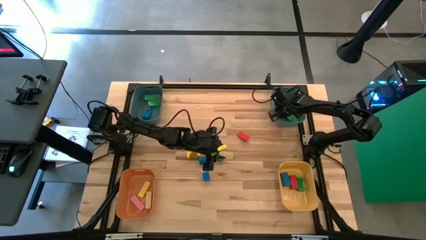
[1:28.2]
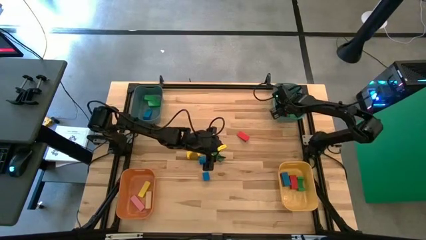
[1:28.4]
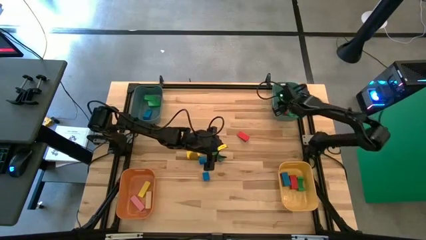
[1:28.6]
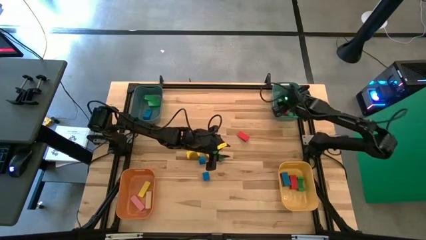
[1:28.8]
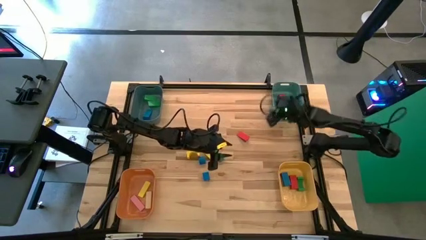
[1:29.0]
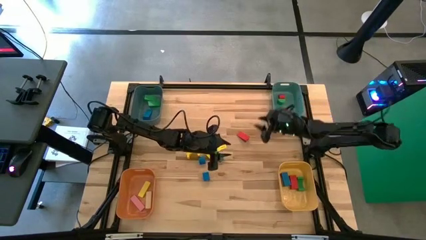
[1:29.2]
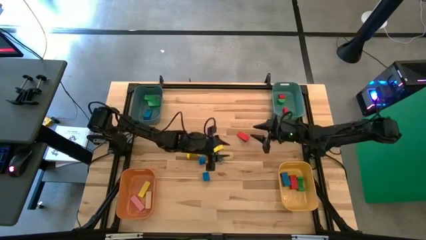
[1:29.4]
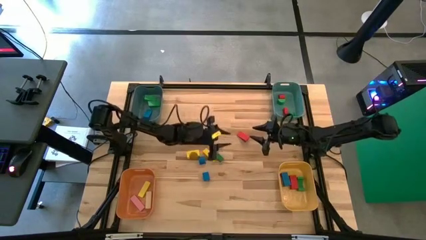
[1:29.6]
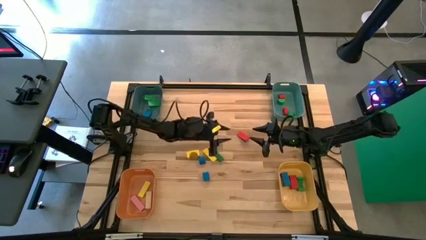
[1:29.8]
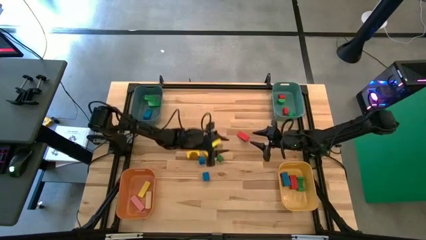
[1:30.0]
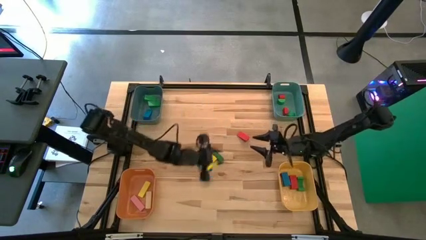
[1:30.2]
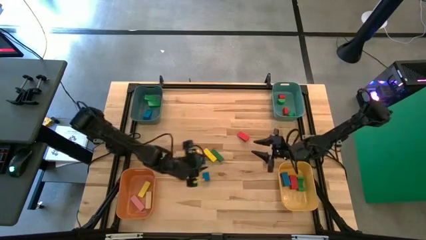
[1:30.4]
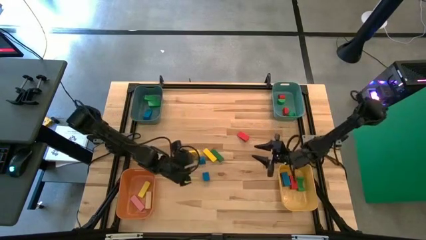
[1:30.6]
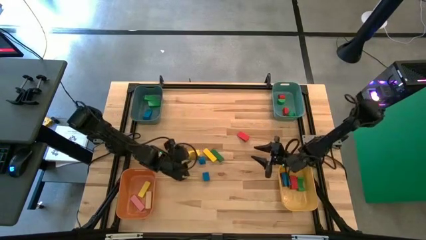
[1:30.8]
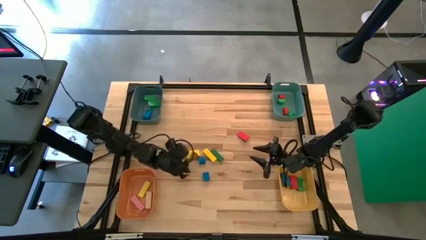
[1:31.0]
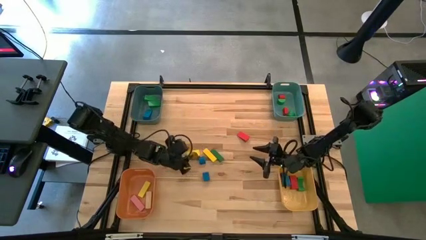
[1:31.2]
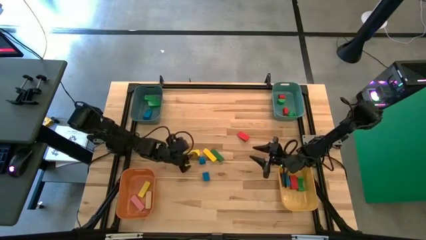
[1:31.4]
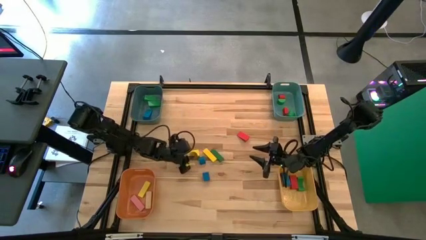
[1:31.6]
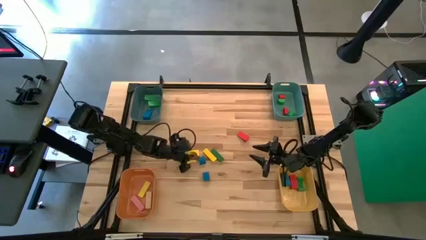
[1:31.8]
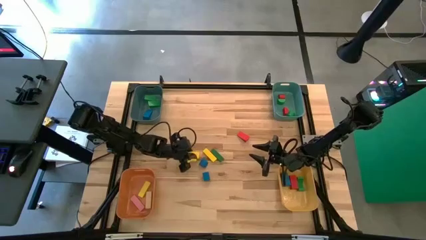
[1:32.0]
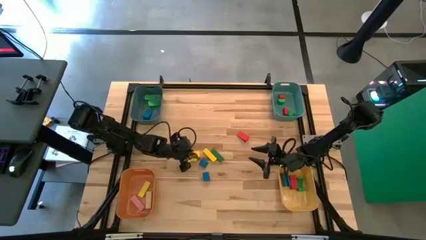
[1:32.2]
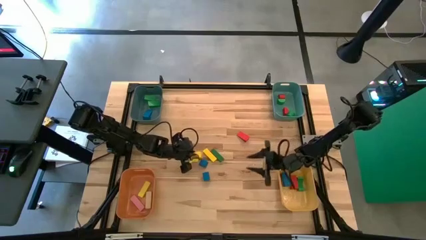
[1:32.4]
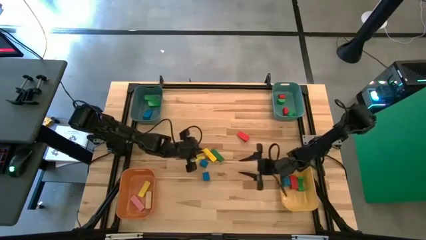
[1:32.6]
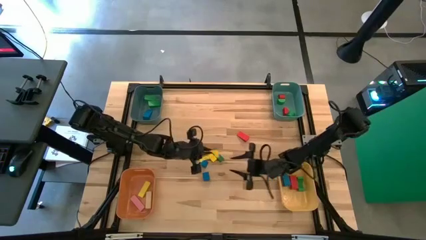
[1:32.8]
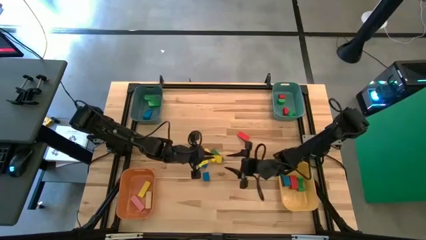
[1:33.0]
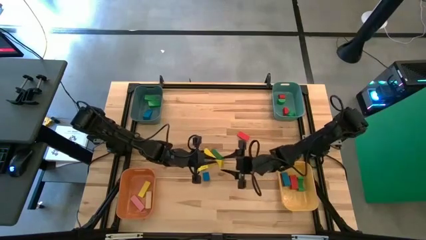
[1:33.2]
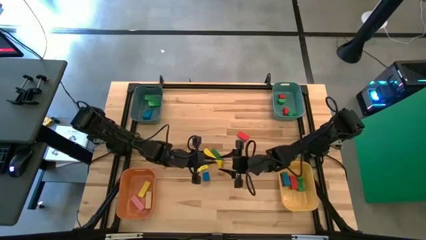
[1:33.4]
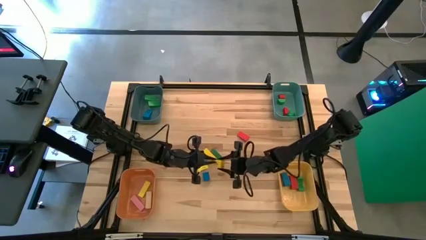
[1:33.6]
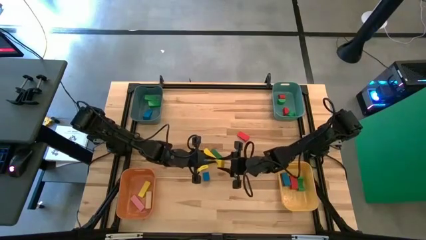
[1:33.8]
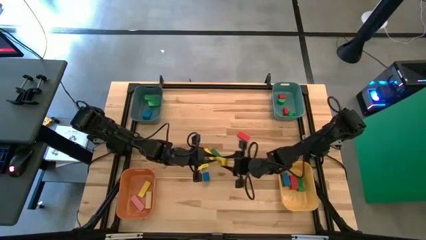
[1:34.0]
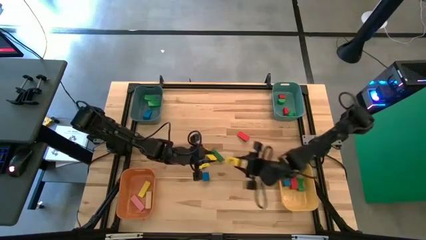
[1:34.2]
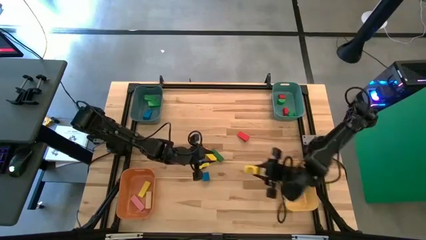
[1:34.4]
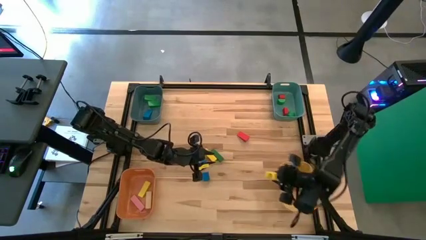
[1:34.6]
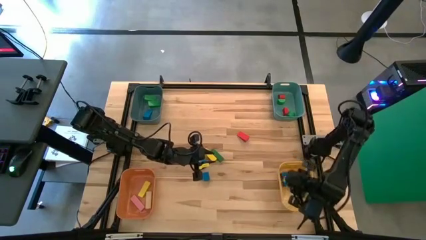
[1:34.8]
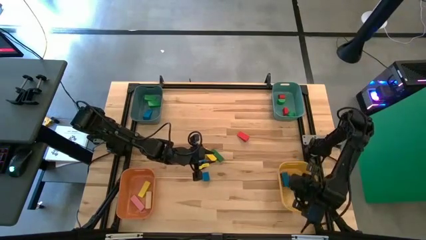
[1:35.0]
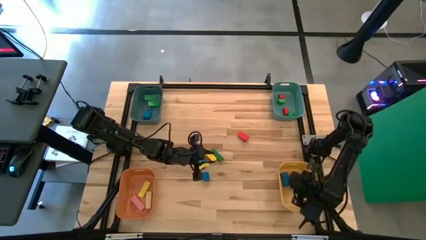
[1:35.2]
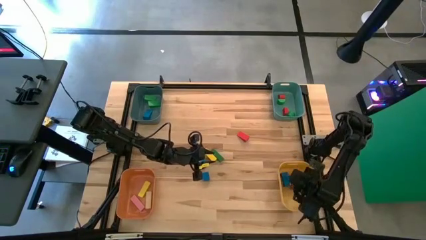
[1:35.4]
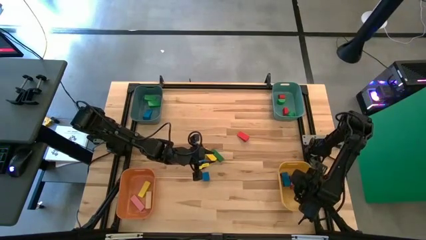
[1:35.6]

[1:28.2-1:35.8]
Task: Sort blocks by size
Put the yellow arch block into the yellow bin

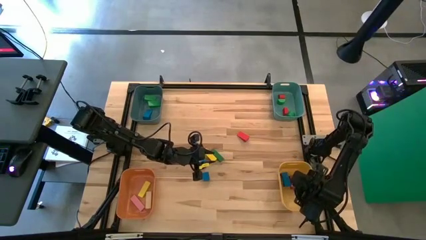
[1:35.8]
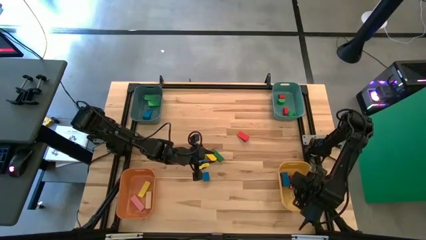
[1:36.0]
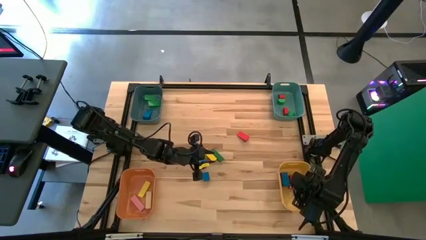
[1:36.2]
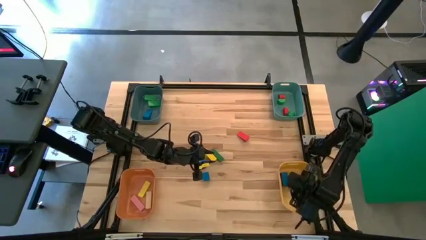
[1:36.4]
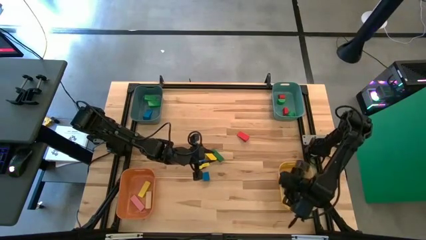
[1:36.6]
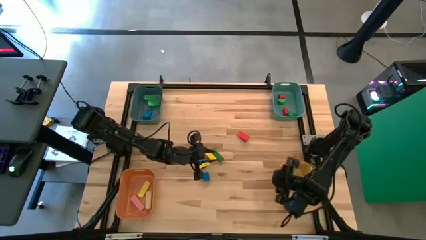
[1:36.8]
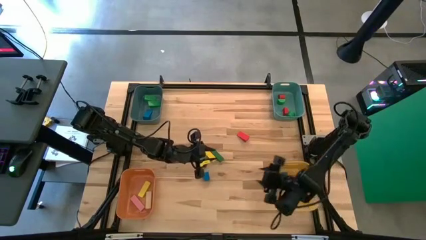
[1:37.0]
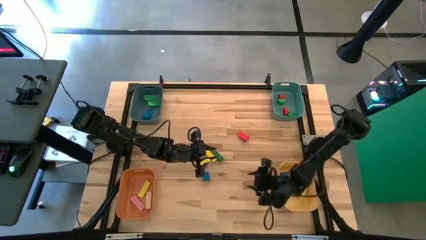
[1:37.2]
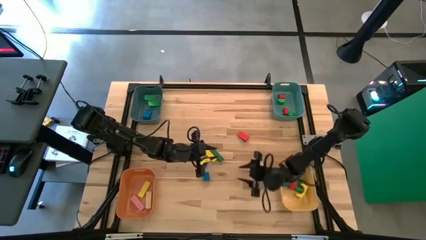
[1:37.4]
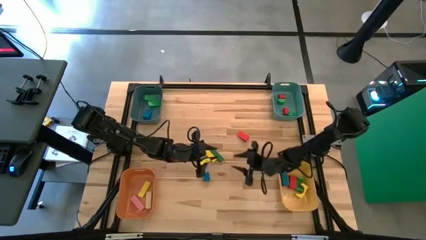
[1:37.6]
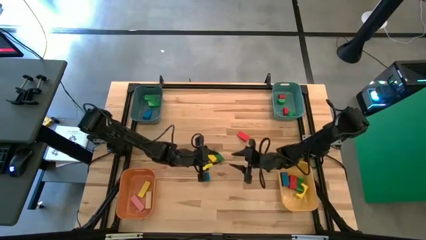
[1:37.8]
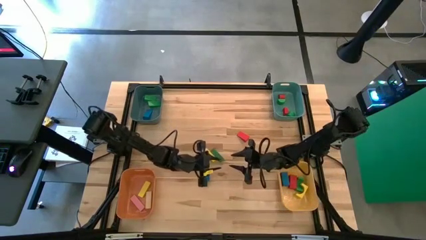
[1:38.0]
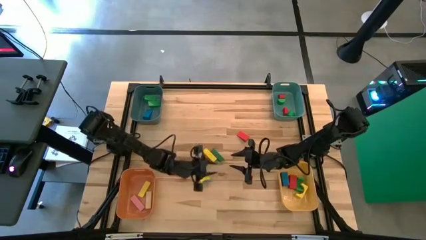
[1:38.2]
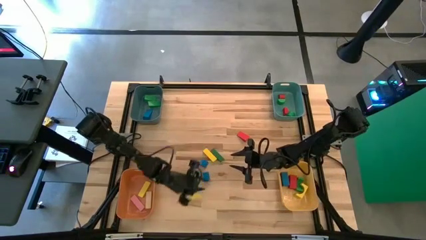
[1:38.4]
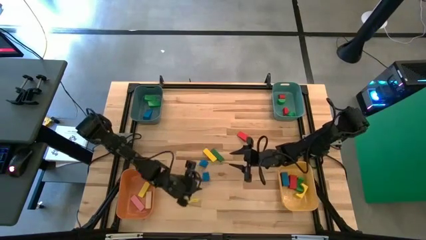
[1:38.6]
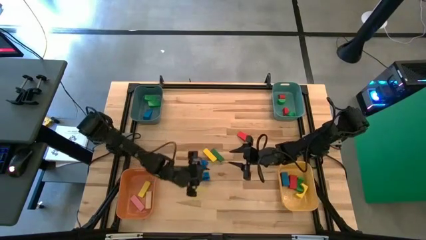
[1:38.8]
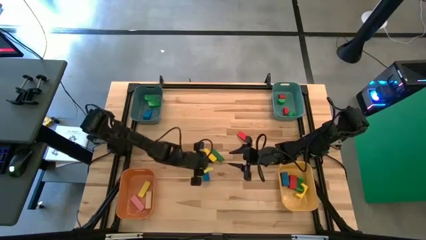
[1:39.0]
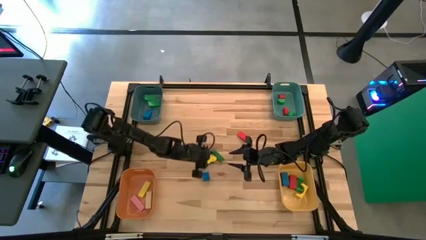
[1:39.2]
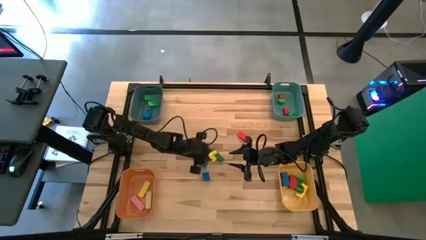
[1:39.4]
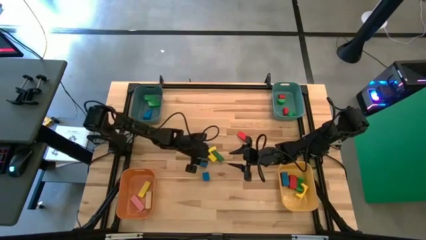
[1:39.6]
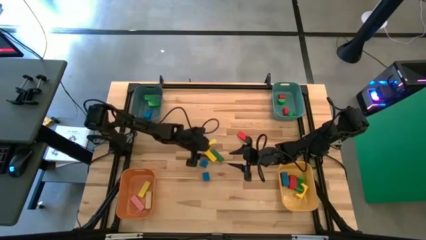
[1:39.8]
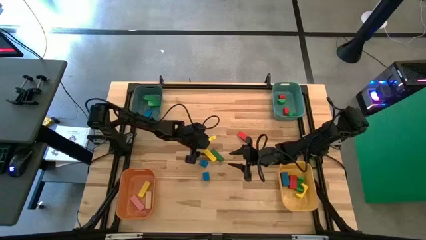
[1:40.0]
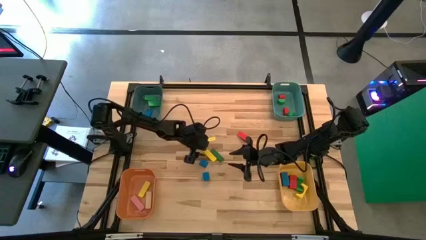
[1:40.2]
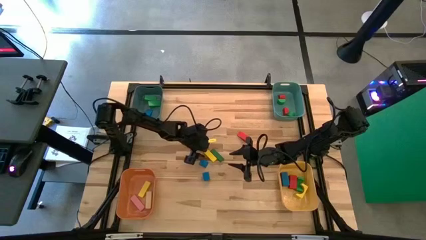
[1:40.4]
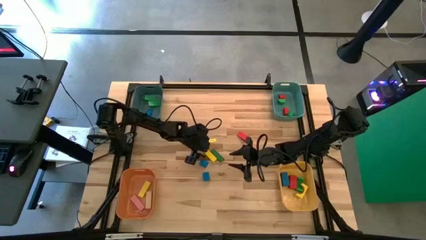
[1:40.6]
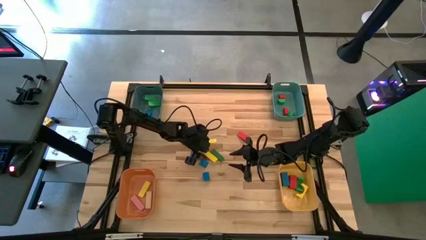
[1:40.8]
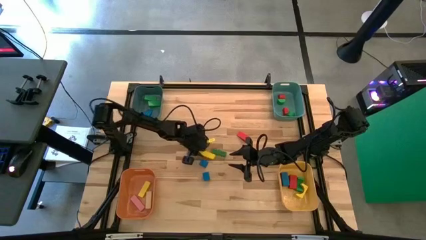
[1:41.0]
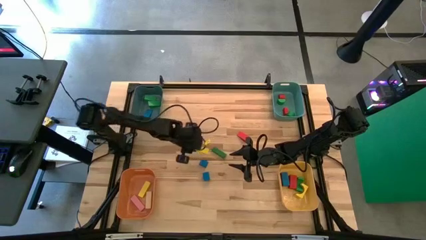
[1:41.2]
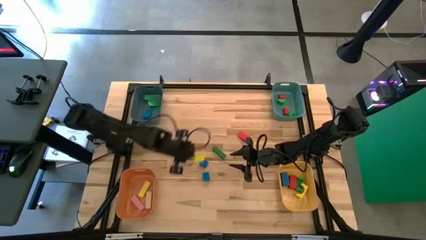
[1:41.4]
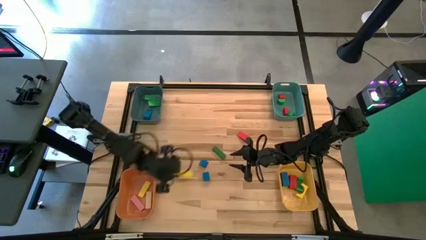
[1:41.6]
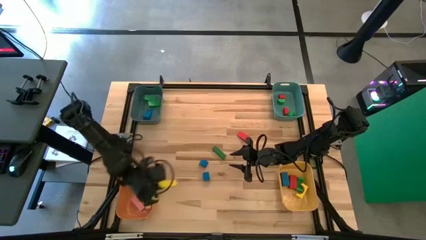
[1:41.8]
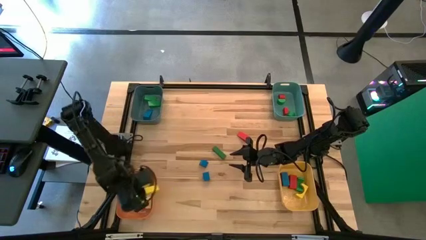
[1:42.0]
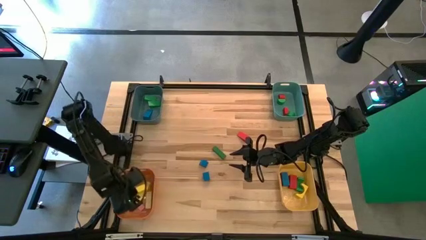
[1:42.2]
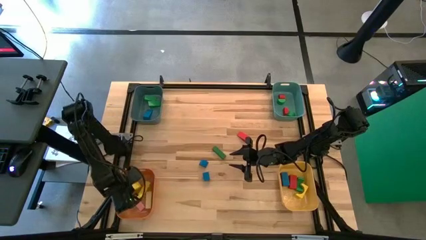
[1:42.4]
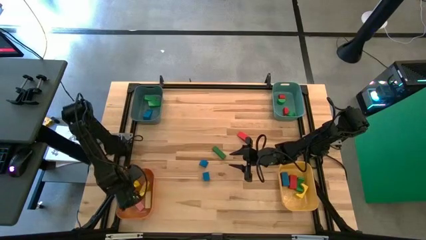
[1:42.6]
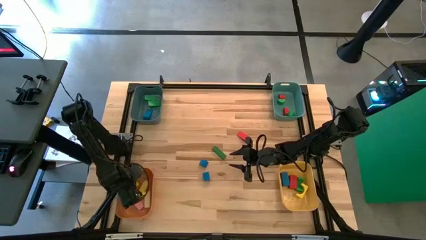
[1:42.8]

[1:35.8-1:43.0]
Put the yellow rectangular block into the orange bin

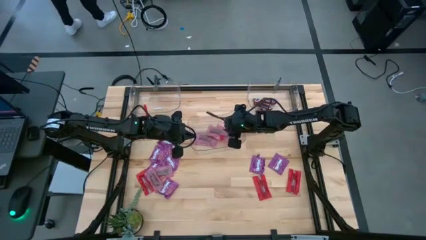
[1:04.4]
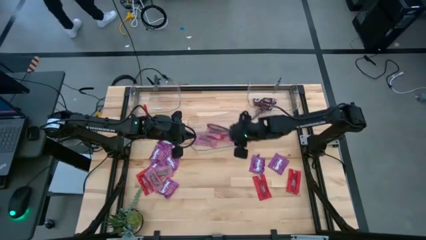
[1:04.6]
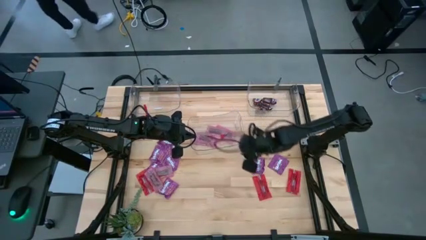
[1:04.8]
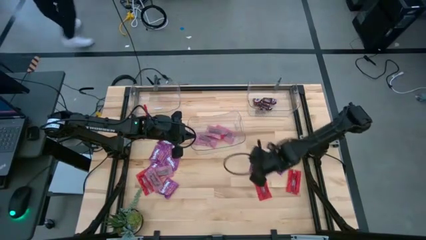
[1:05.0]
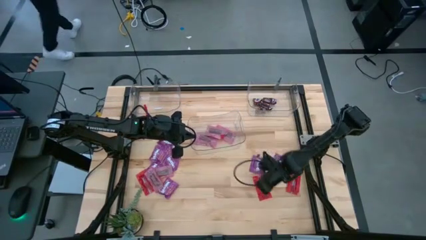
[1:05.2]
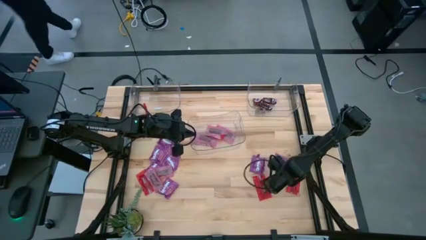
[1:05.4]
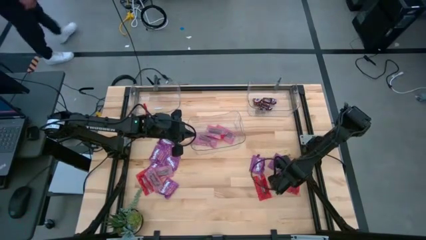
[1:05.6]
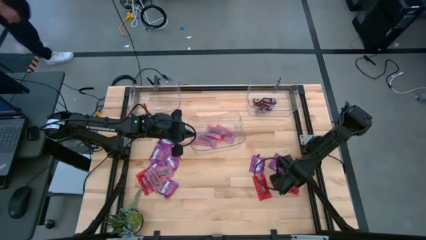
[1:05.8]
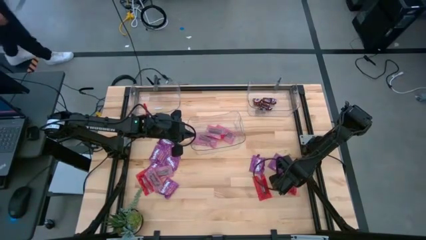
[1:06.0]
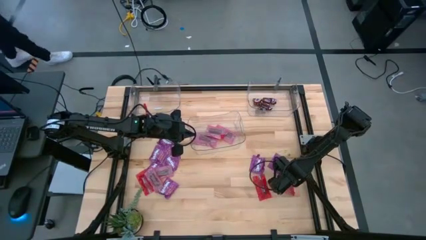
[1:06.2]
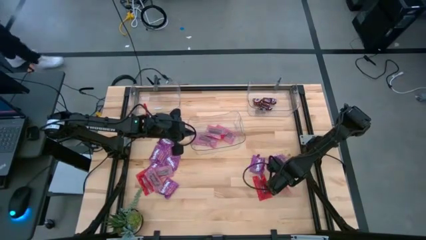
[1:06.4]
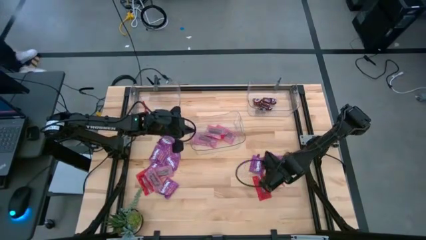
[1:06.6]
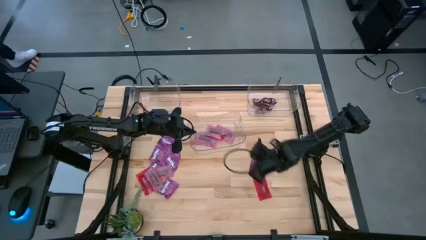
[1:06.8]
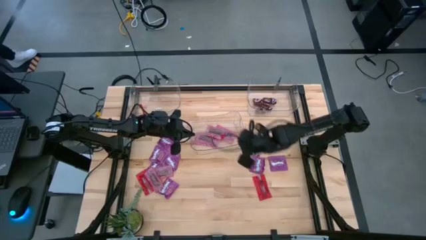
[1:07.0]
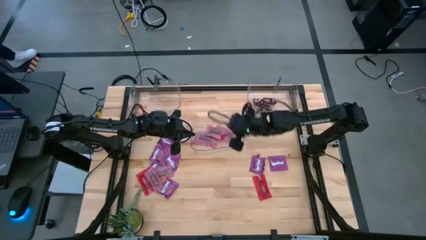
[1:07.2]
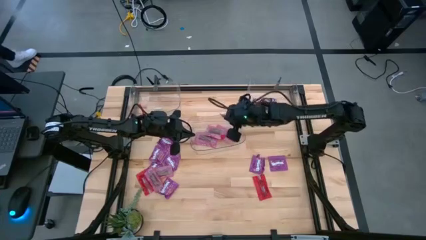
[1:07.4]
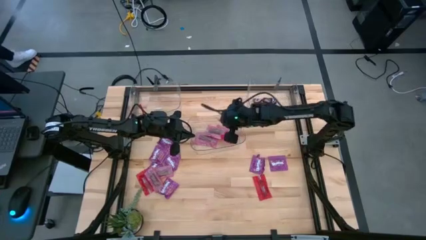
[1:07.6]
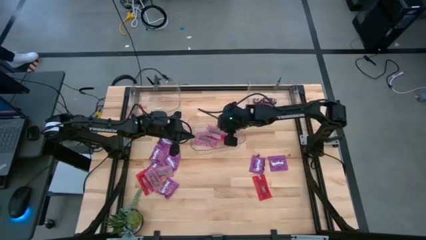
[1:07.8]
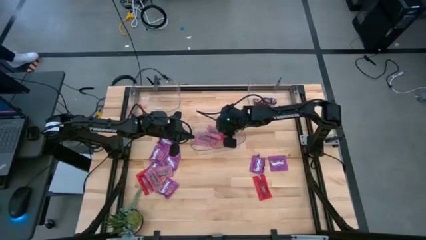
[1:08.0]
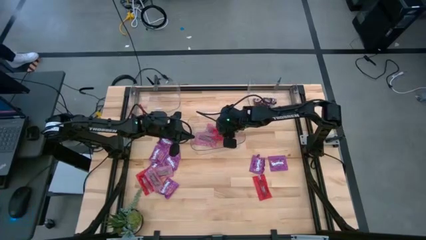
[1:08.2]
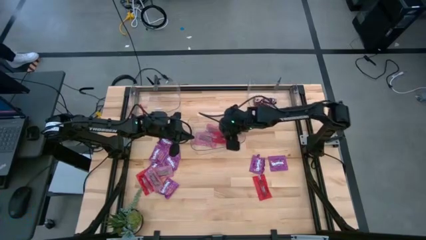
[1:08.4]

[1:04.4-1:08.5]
Task: Sort candy
Put the red candy pack into the bottom transparent bin
